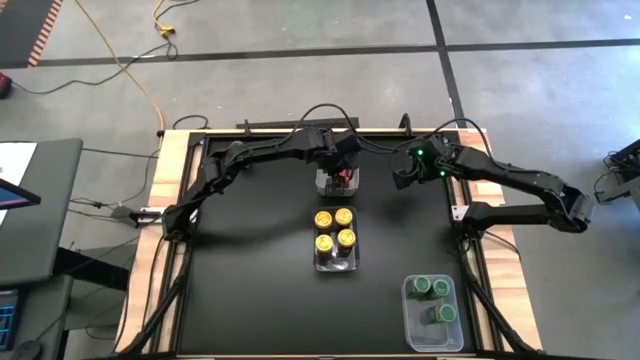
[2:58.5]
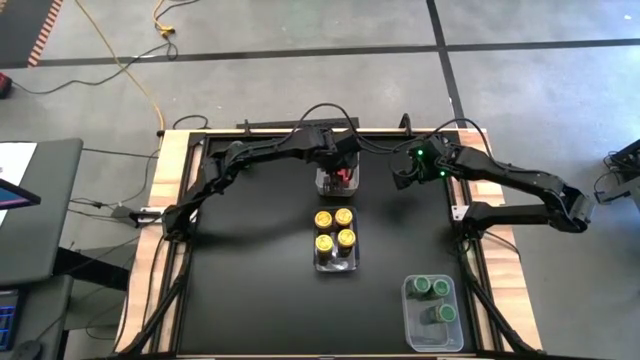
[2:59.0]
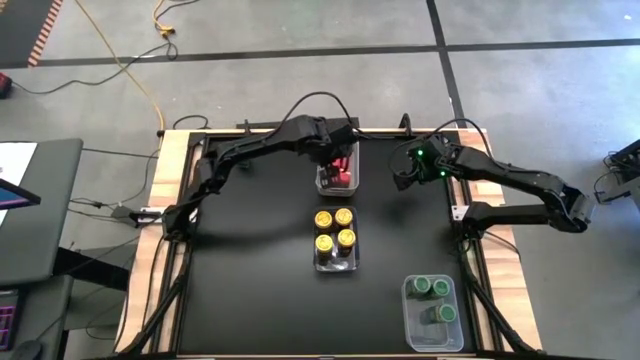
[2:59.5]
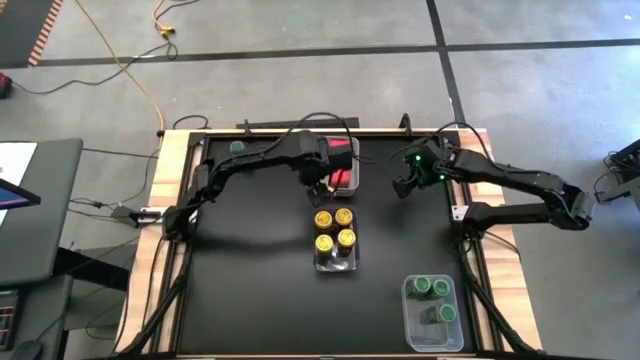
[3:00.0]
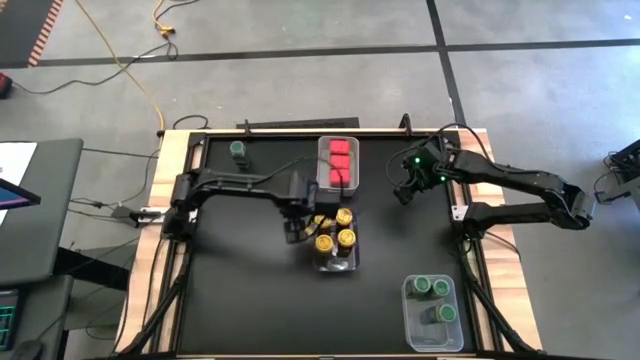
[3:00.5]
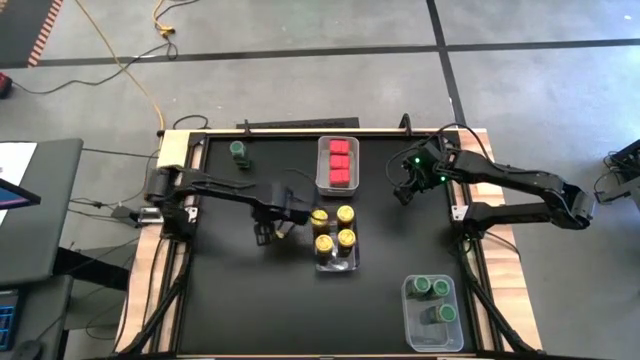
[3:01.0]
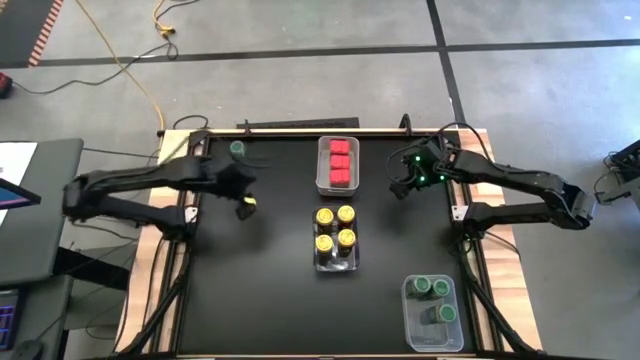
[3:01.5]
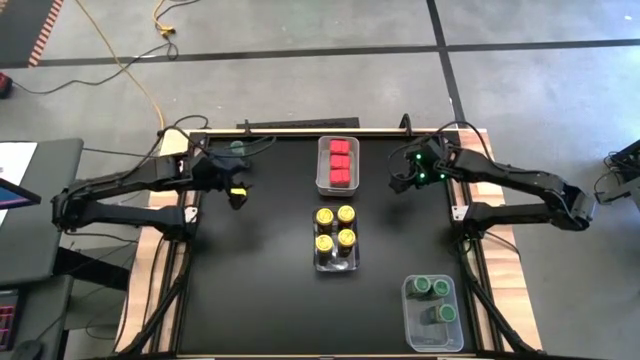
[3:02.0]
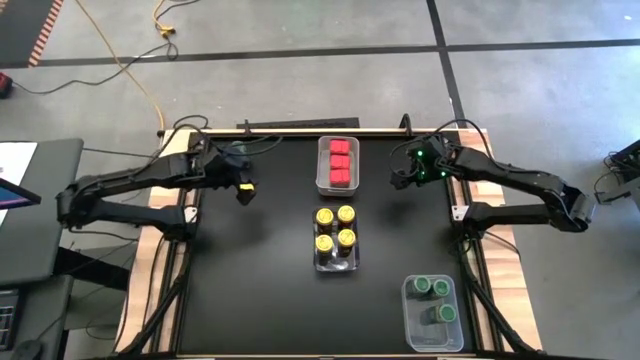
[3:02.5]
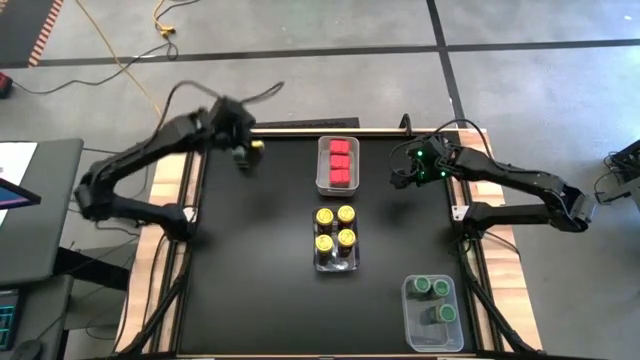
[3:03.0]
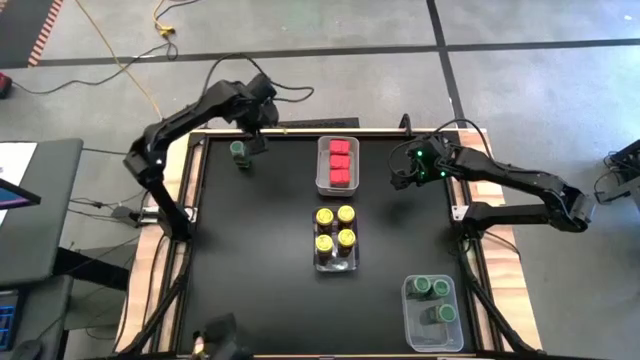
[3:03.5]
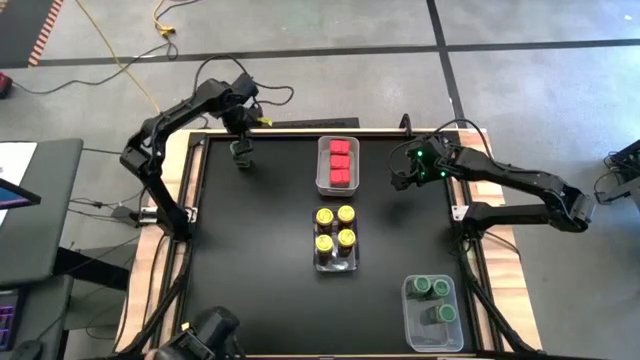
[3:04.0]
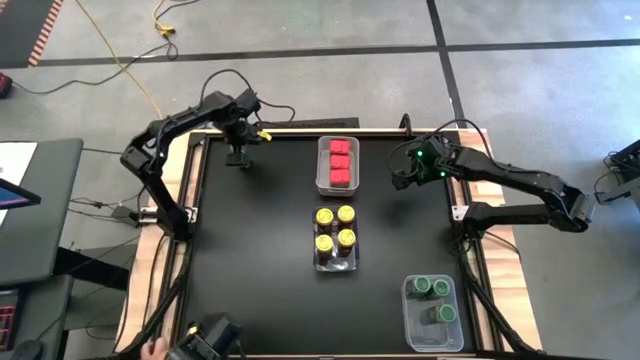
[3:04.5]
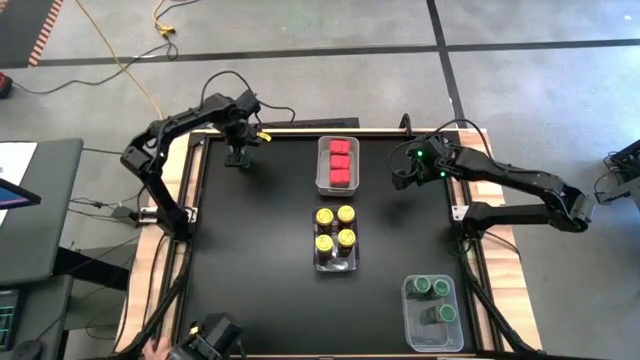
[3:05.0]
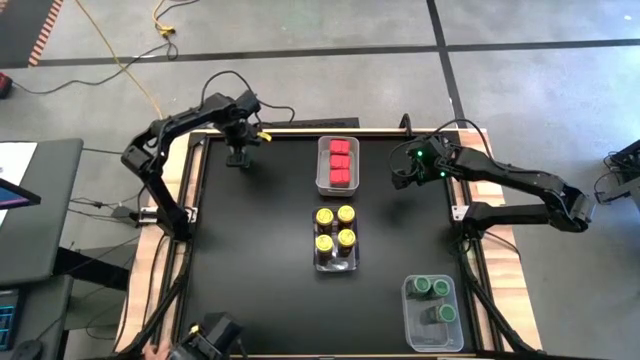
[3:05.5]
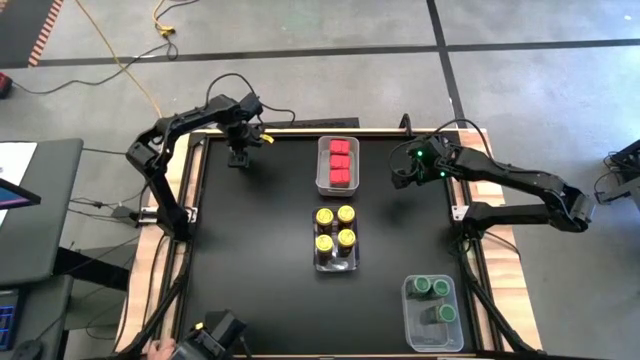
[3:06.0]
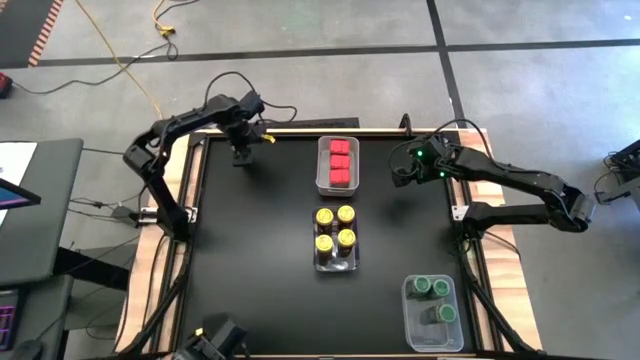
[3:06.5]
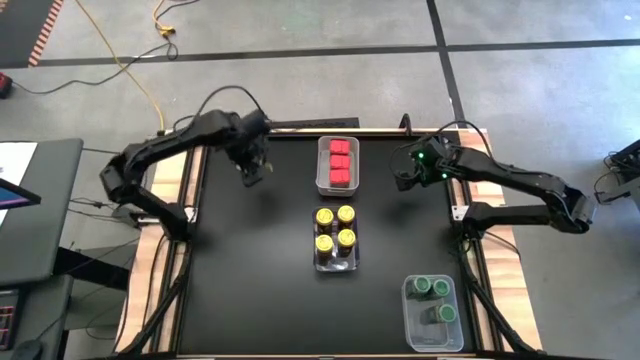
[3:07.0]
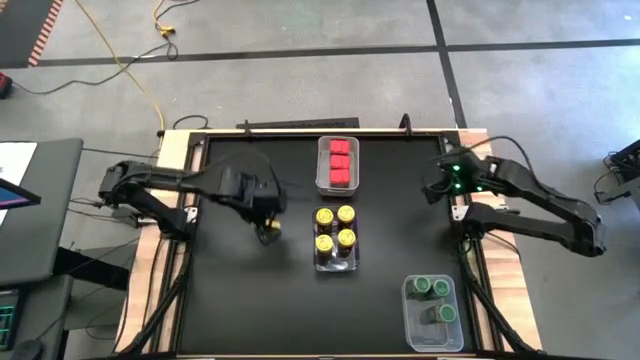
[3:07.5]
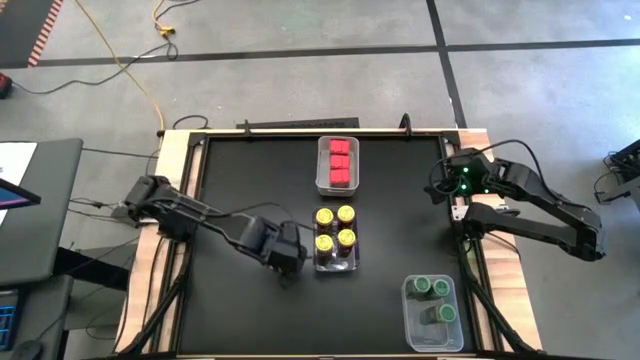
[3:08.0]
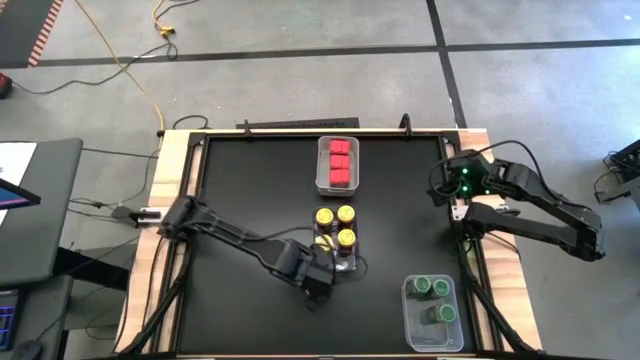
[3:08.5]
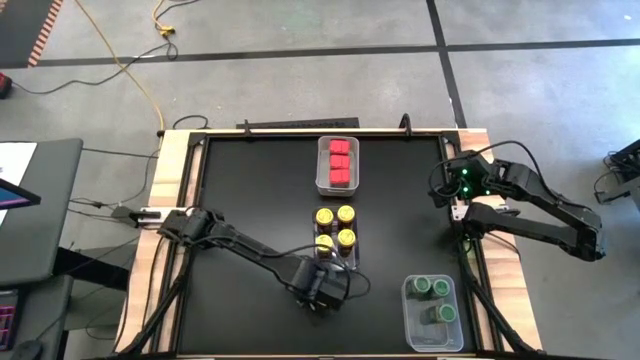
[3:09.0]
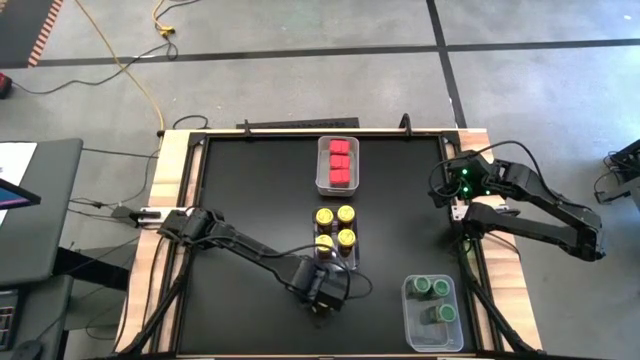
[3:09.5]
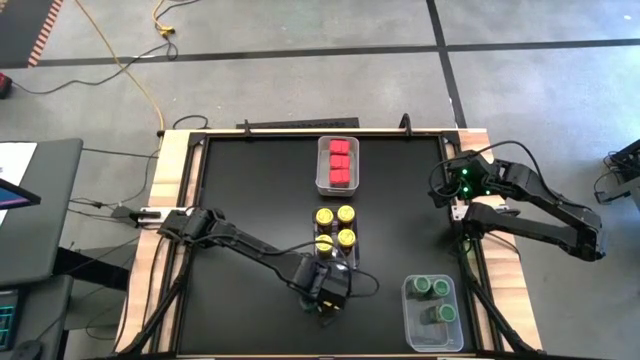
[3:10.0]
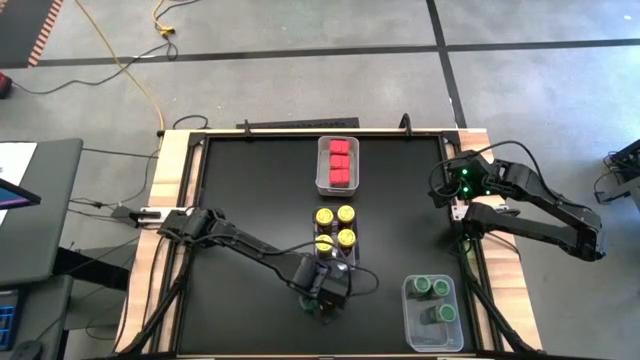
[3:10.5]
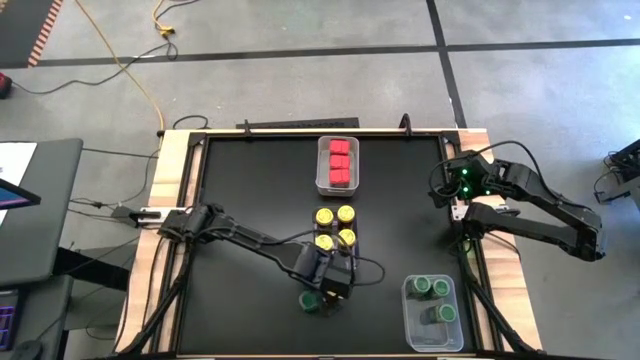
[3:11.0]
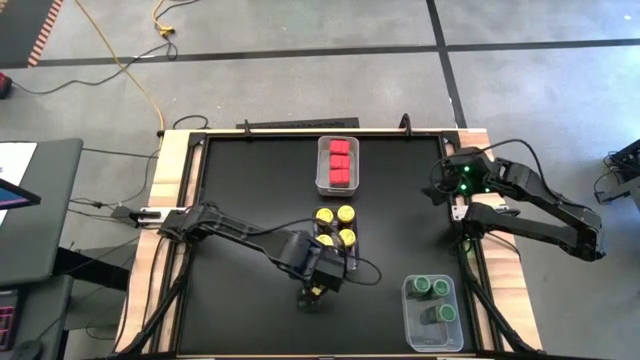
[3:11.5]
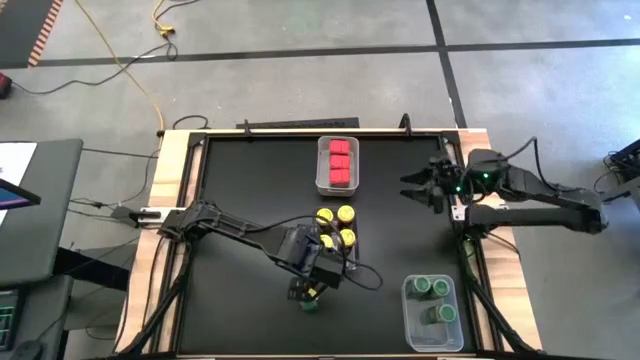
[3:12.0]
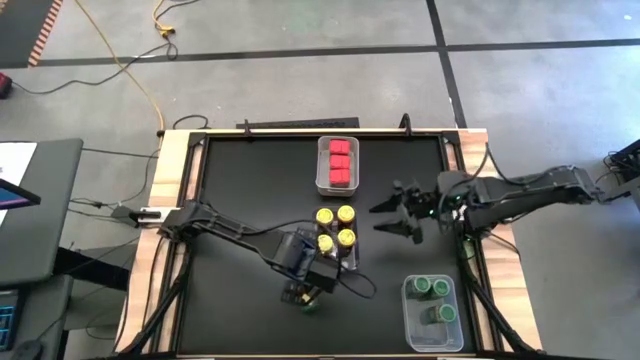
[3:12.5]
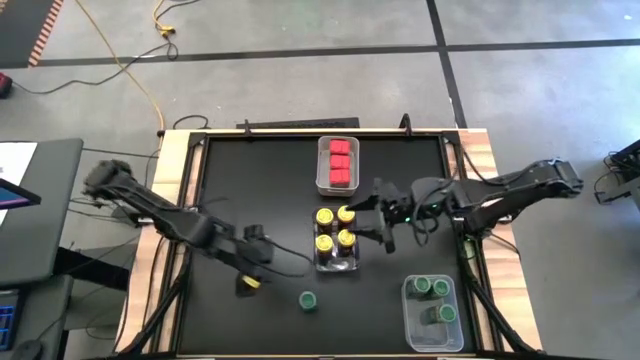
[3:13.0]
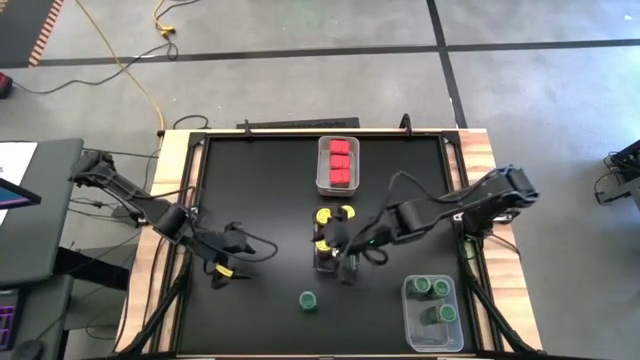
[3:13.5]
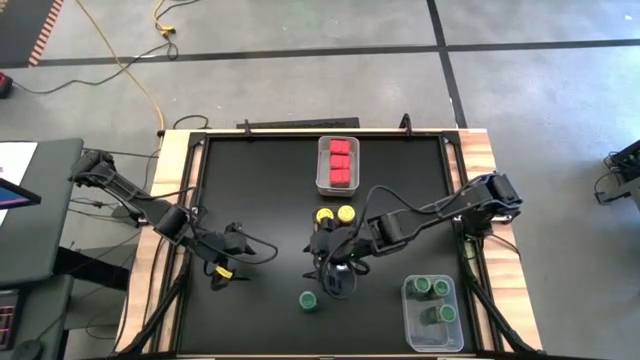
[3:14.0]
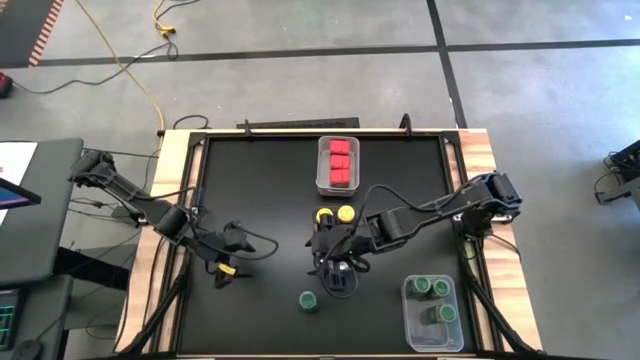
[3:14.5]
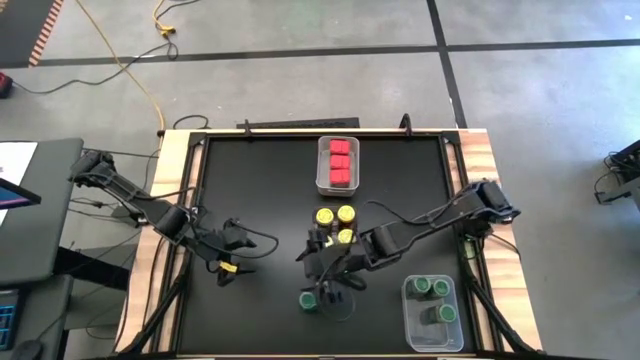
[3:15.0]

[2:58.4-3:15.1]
Task: Sort spices by type
Put the green seasoning bottle into the transparent bin
